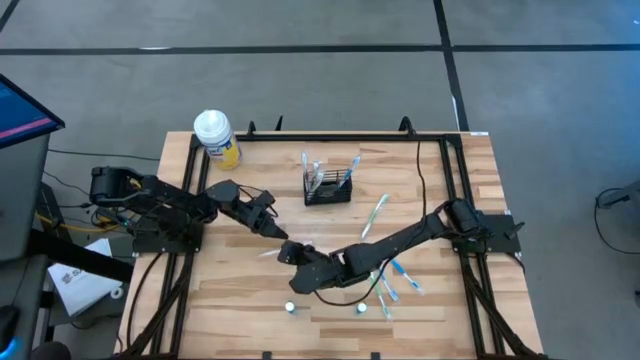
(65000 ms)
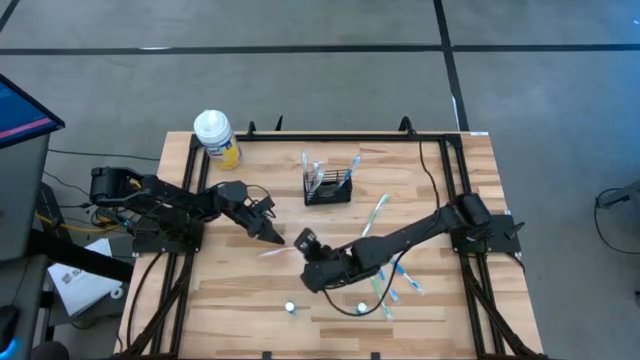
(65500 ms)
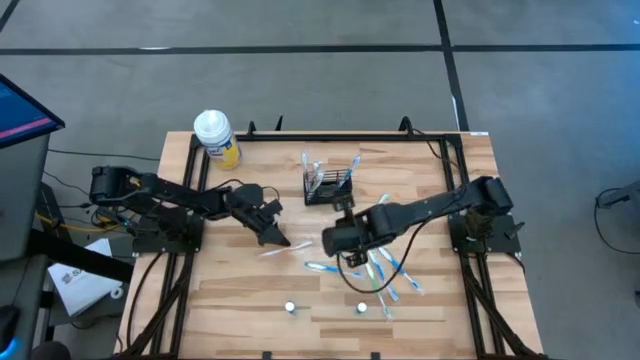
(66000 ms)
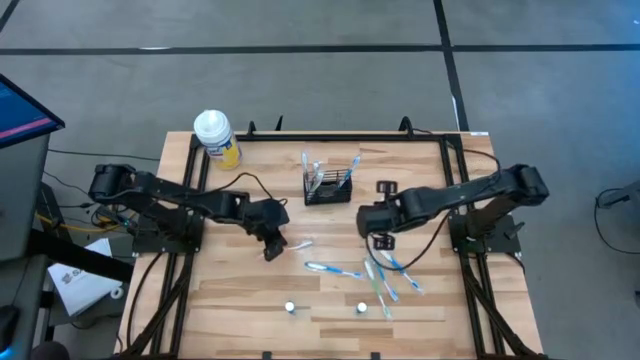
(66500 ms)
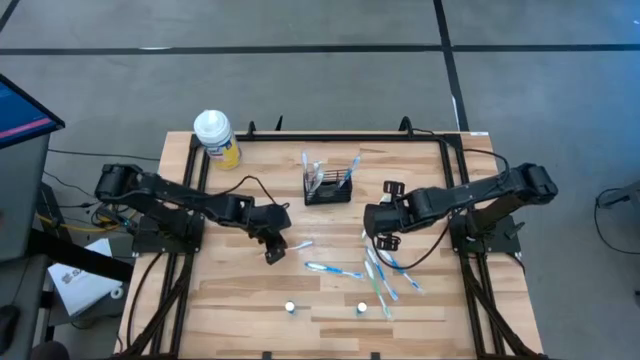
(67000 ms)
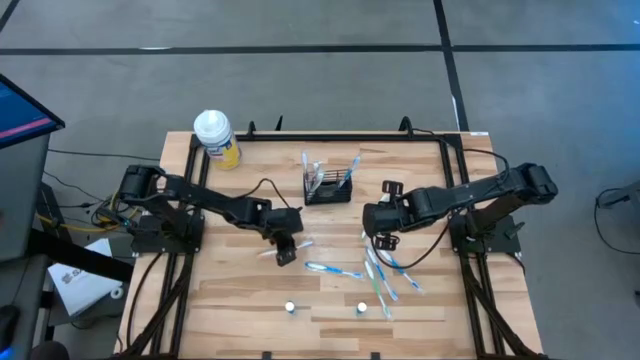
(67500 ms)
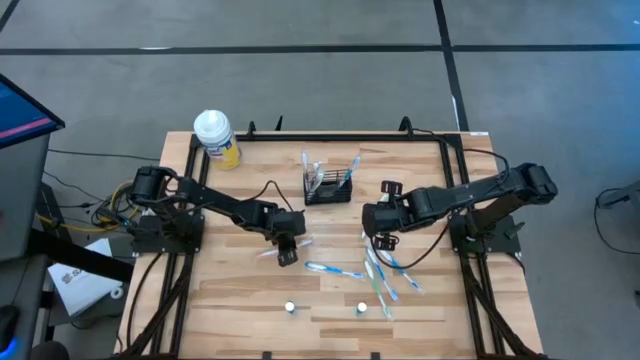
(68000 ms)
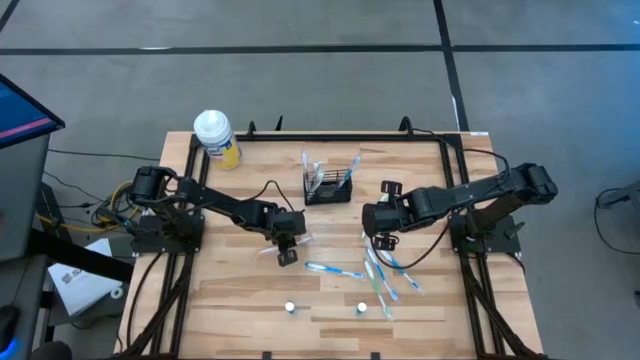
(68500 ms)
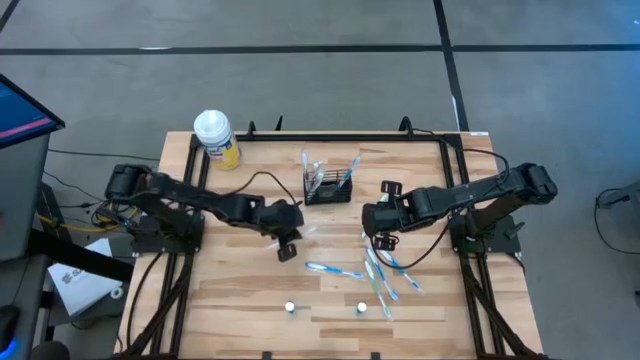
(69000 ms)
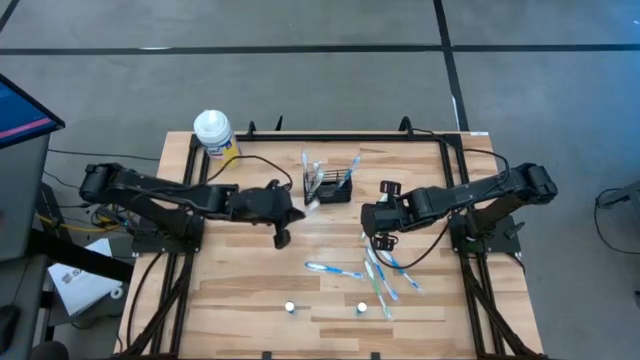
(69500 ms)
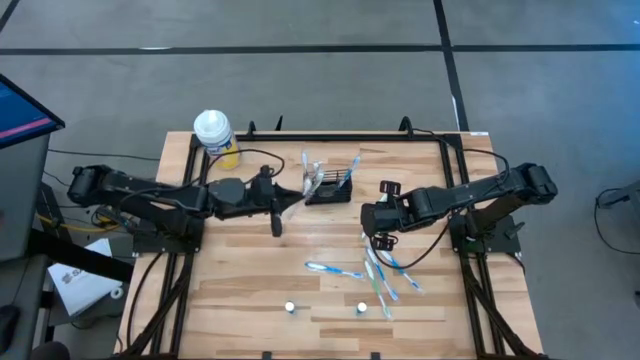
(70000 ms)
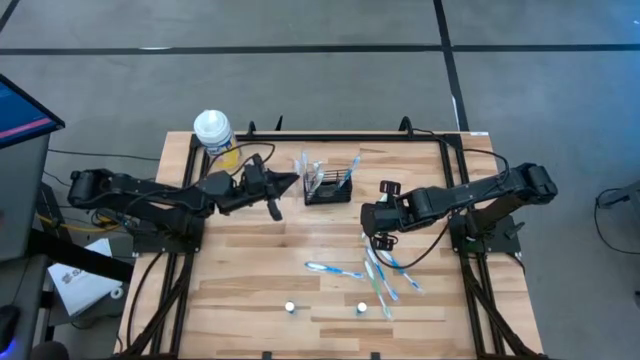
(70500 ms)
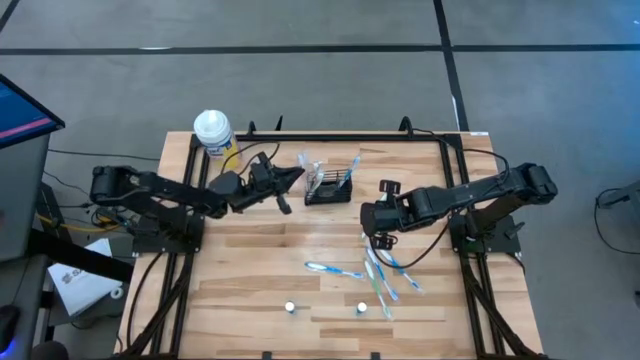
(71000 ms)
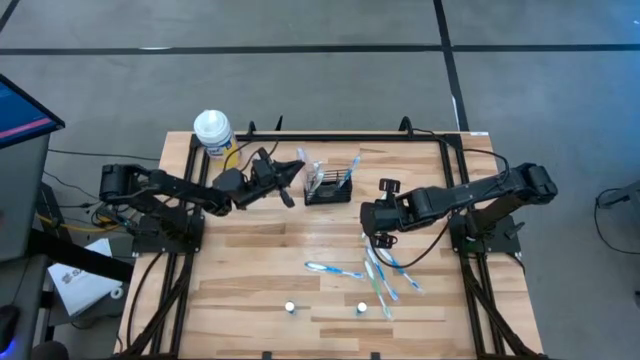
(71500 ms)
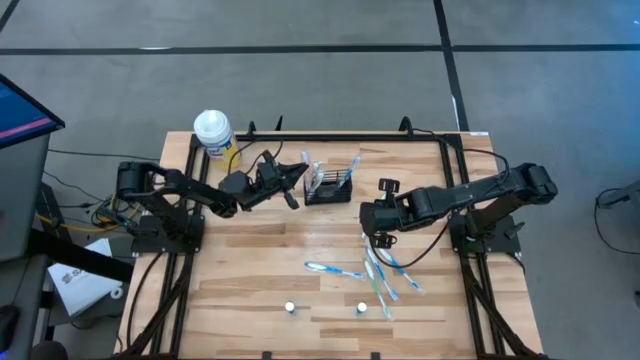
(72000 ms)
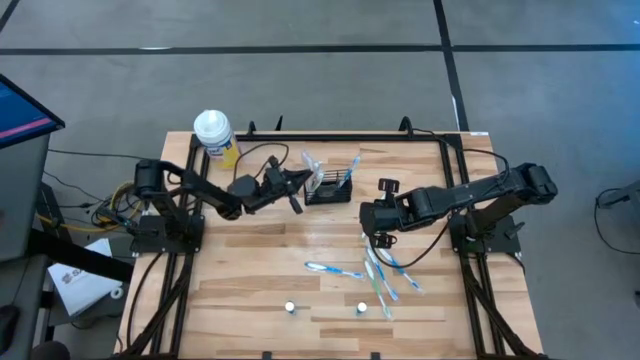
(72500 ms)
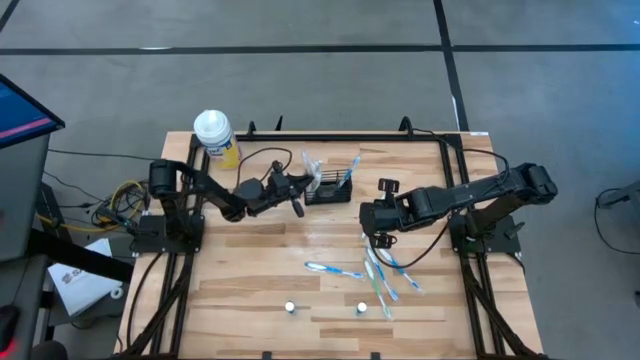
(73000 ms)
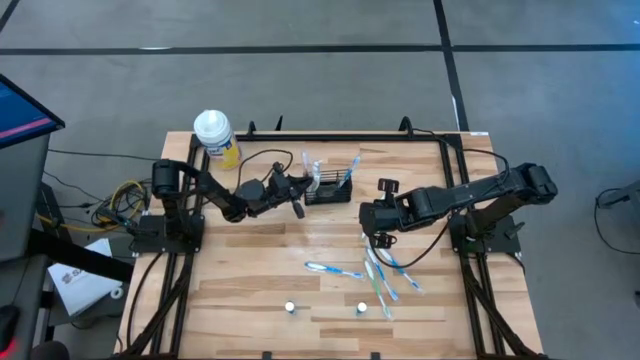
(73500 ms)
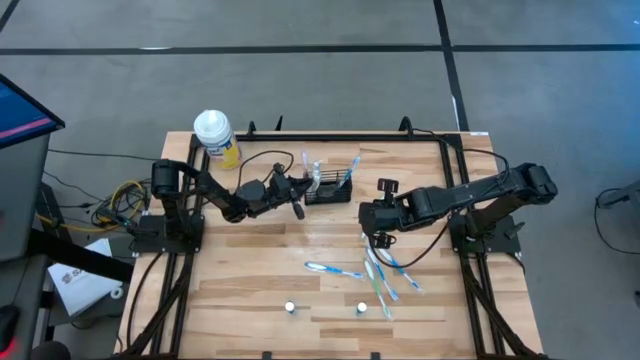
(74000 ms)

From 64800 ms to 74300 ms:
Task: Pick & Place toothbrushing station
Put the orange toothbrush into the black mesh organizer

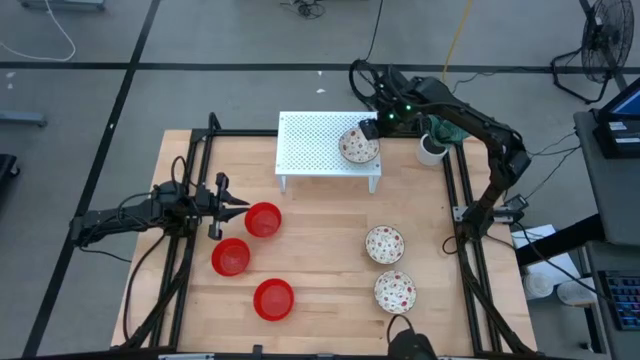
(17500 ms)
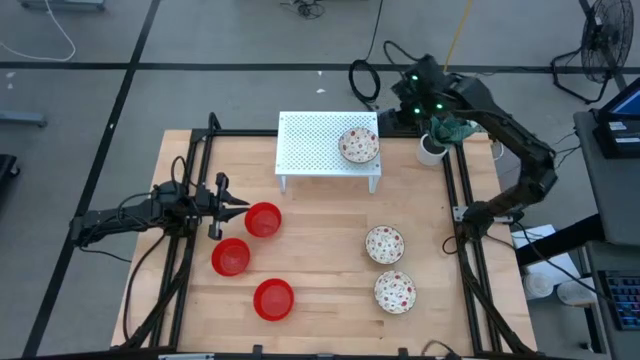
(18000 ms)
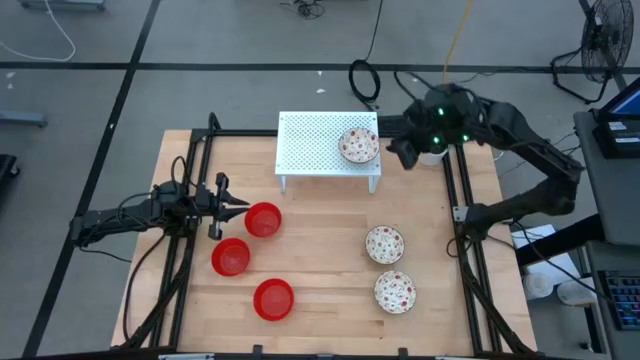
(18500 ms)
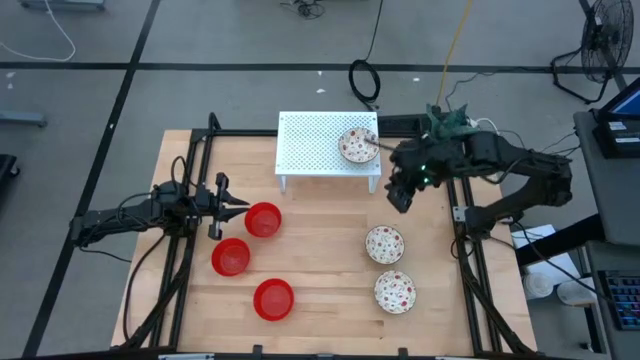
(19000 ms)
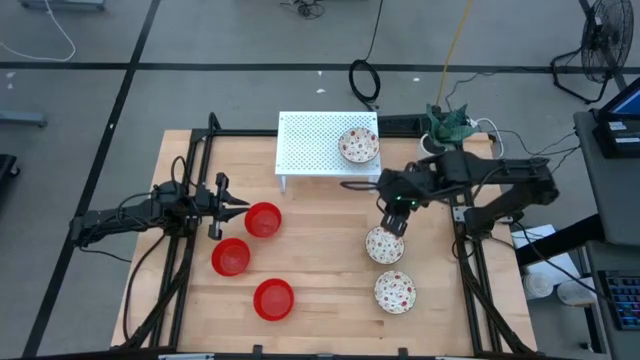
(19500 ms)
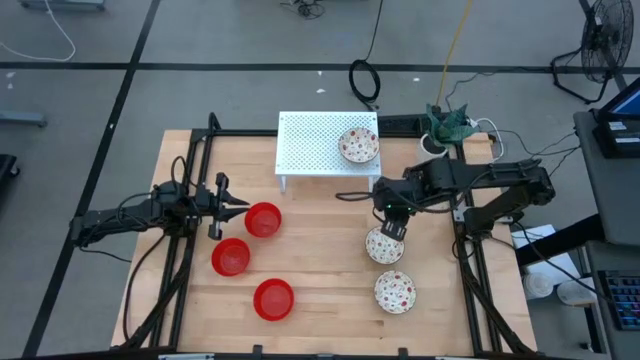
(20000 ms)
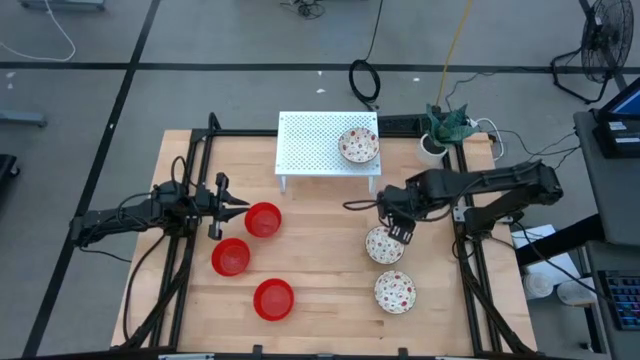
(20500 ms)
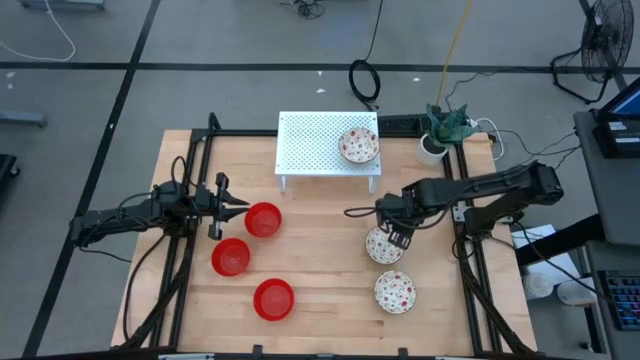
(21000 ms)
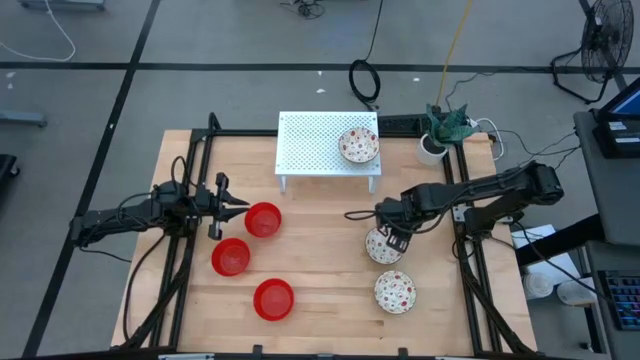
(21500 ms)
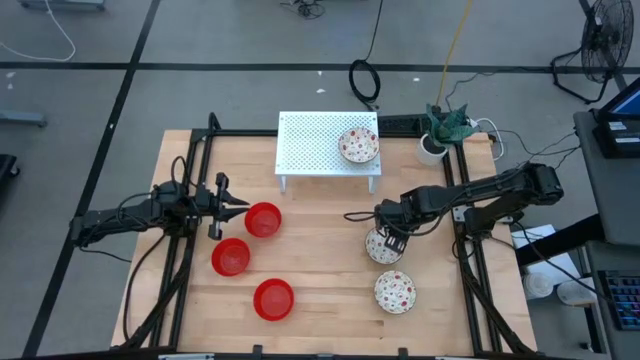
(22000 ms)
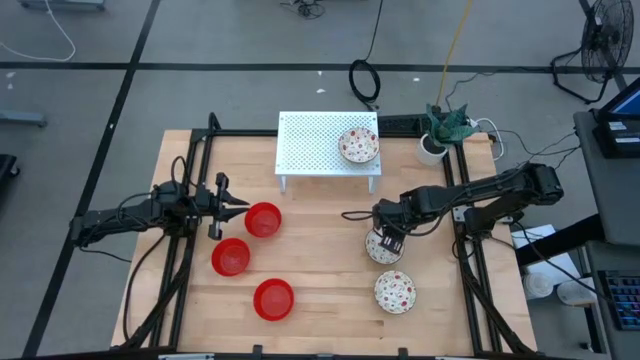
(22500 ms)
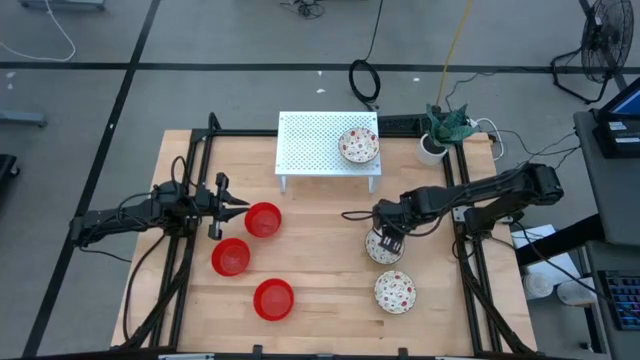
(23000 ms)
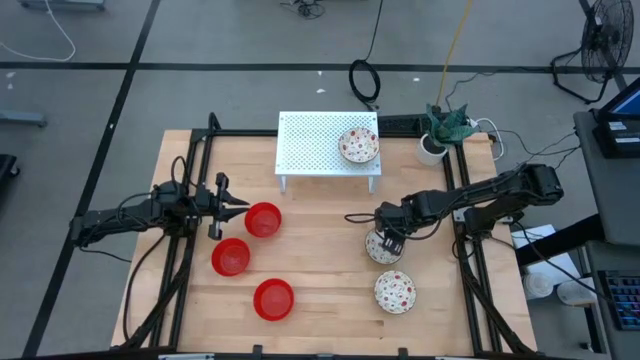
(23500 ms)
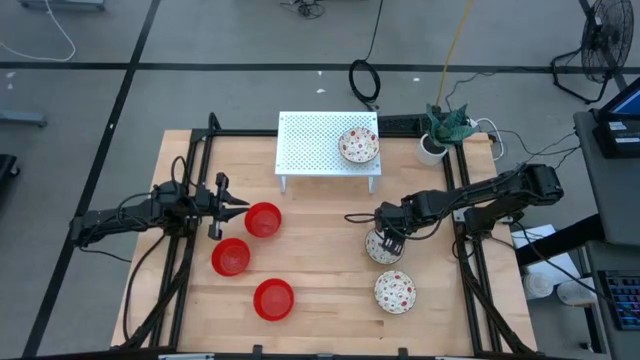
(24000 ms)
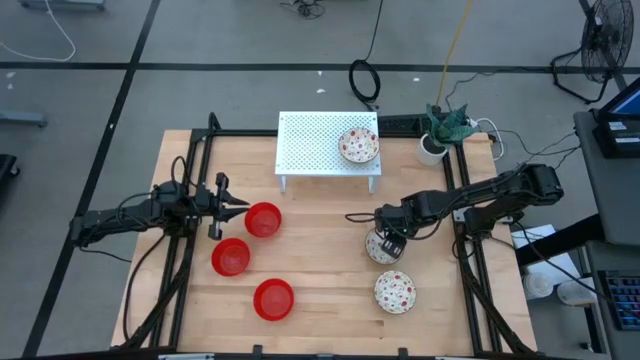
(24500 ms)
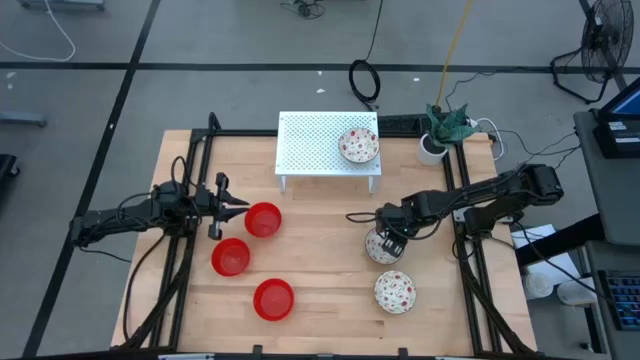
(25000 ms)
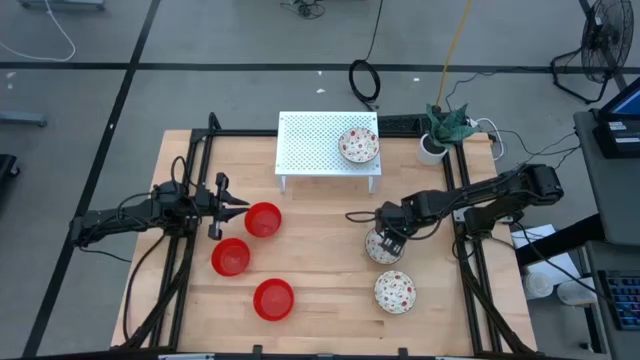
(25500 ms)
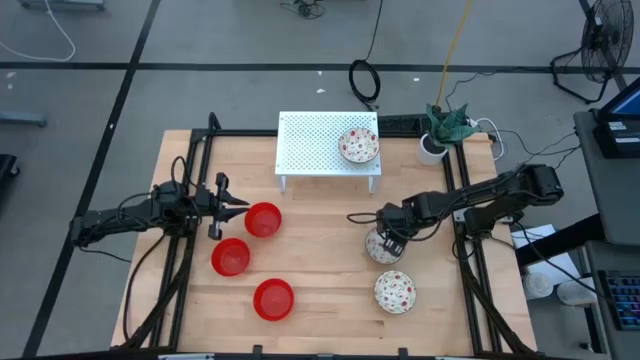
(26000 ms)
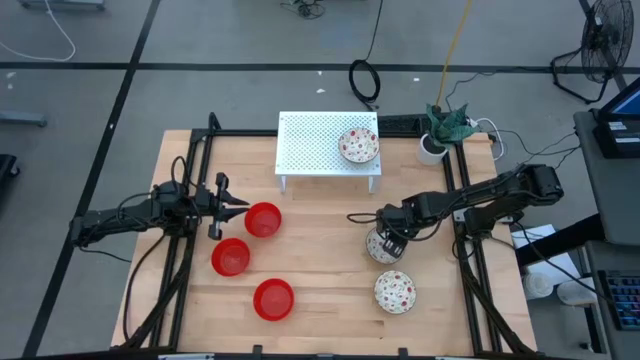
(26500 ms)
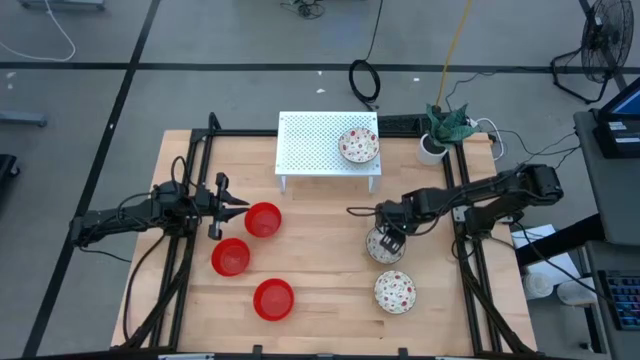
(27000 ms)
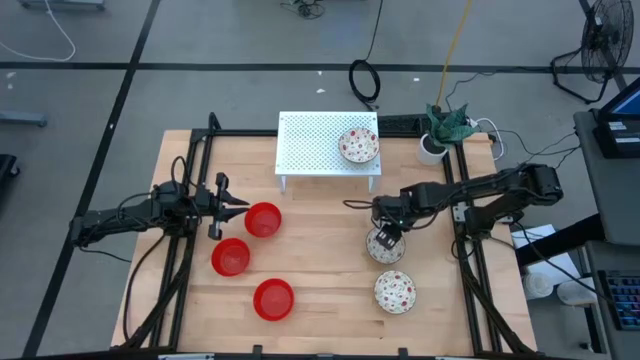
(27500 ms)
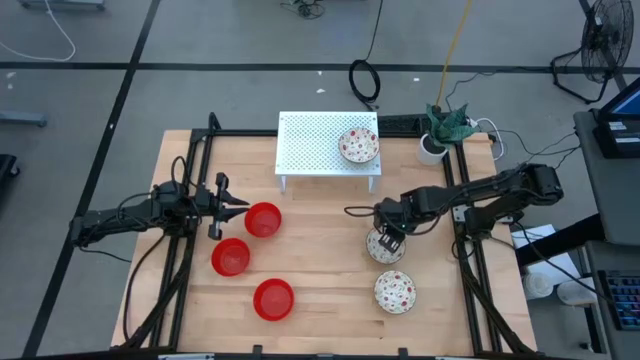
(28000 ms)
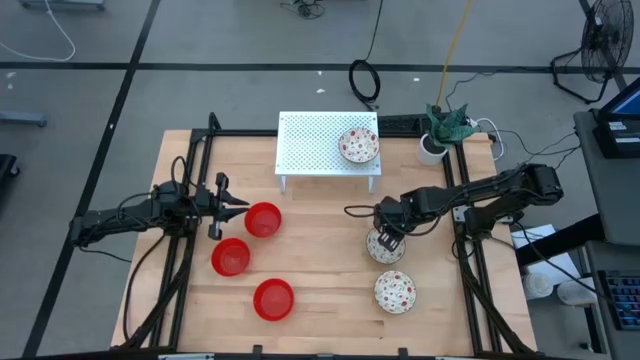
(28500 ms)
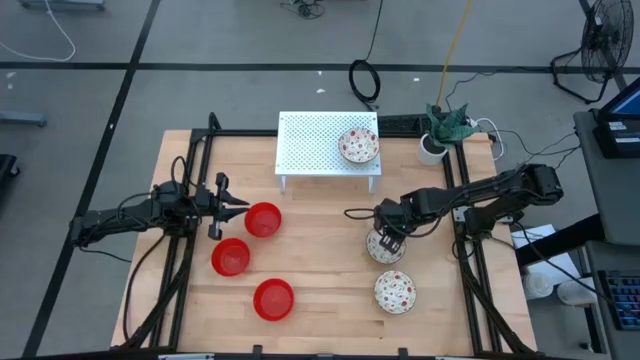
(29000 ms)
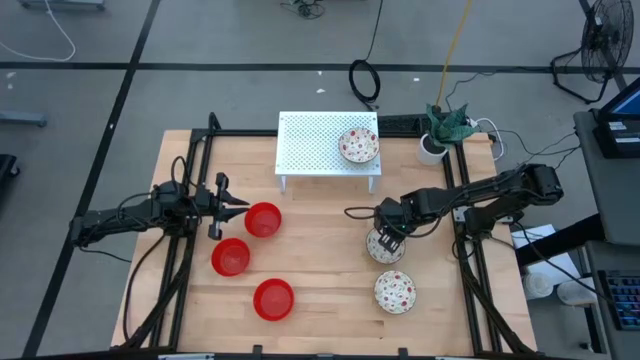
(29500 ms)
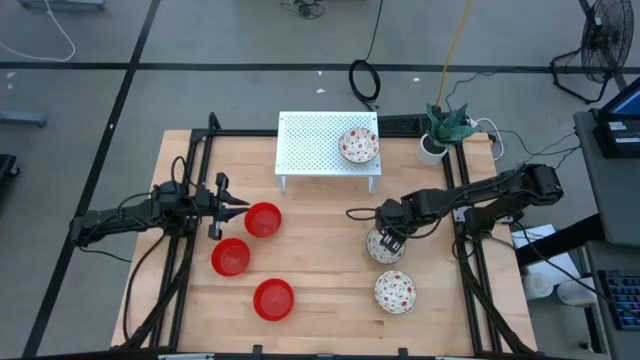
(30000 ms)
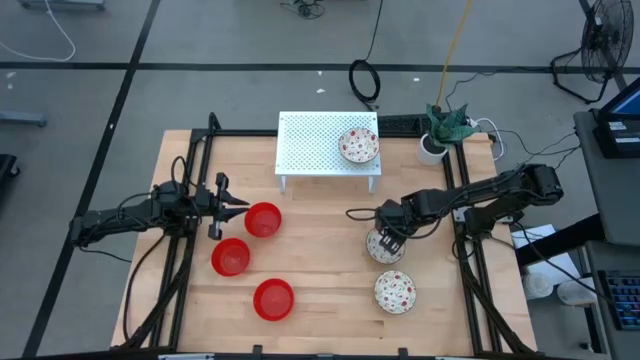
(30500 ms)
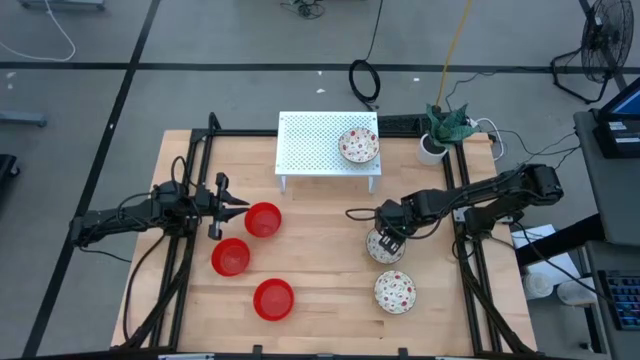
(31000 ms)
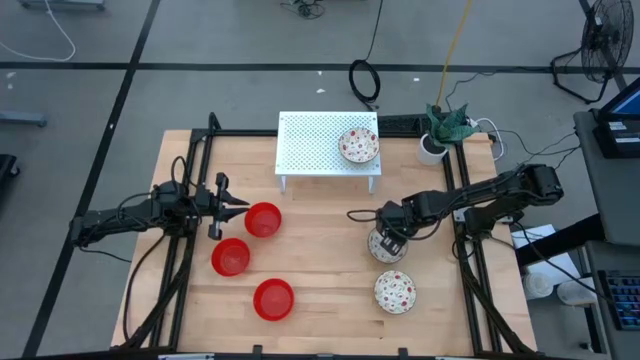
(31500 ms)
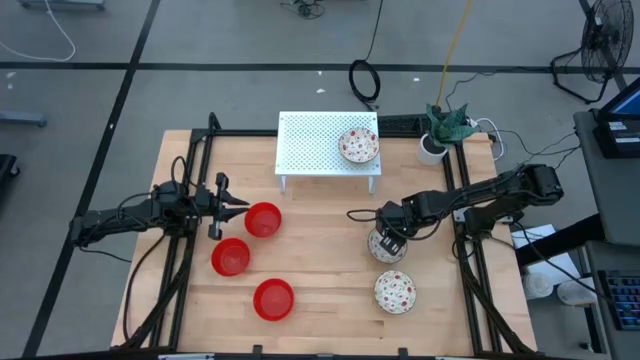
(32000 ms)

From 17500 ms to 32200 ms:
Task: Pick & Place Mini bowls
Stack the top white patterned bowl on the white patterned bowl on the shelf
